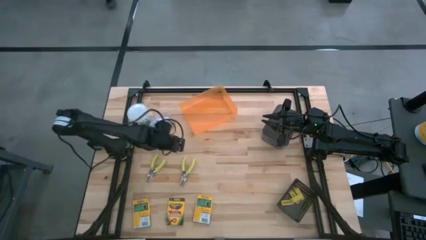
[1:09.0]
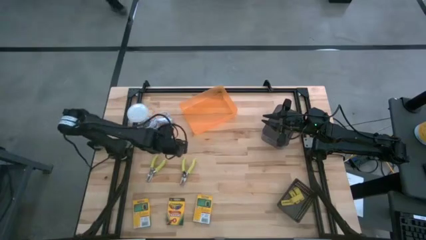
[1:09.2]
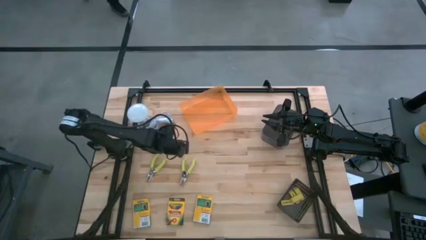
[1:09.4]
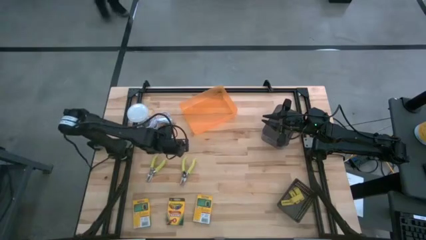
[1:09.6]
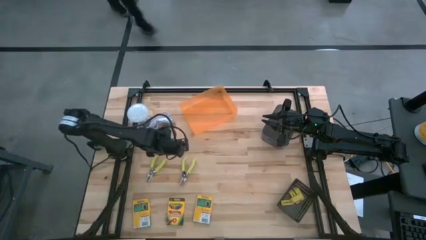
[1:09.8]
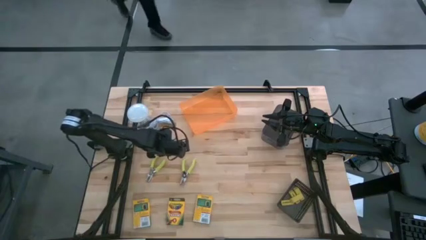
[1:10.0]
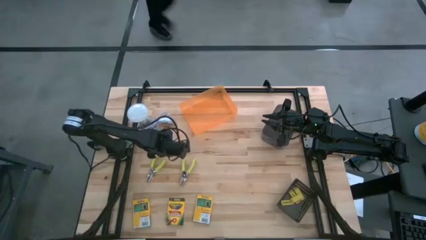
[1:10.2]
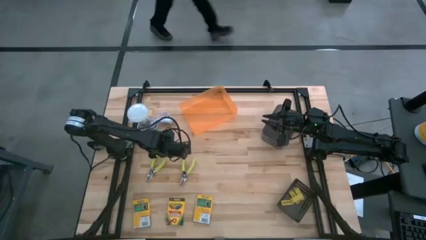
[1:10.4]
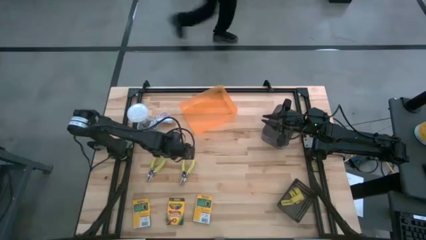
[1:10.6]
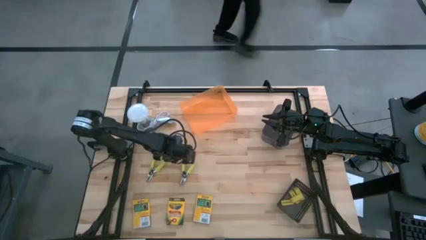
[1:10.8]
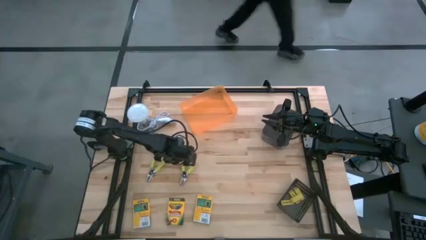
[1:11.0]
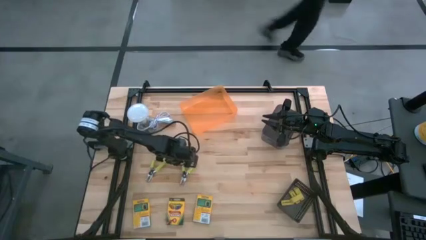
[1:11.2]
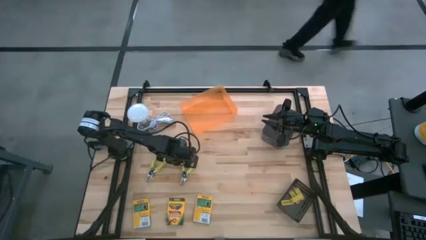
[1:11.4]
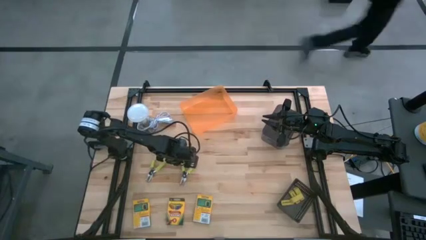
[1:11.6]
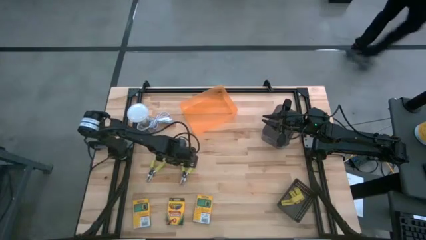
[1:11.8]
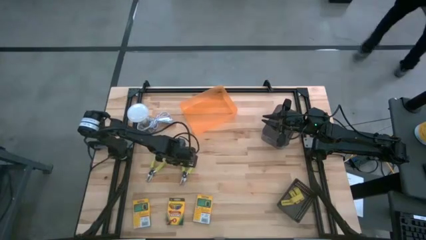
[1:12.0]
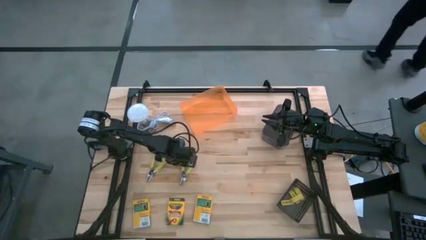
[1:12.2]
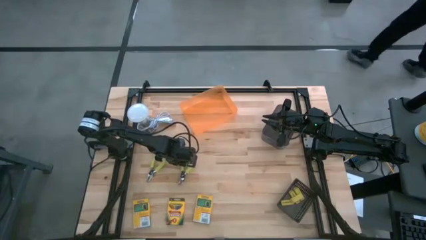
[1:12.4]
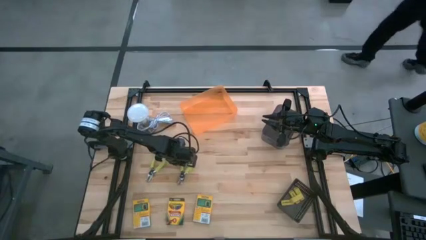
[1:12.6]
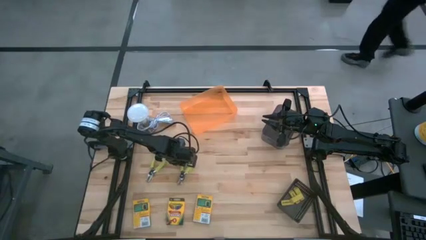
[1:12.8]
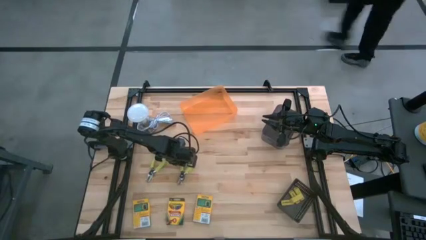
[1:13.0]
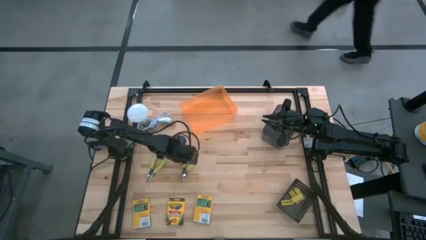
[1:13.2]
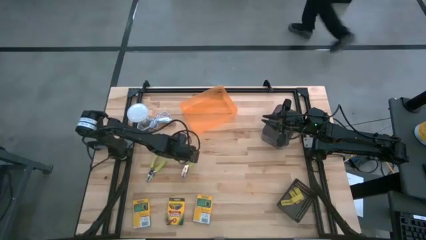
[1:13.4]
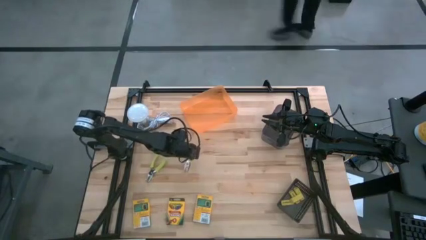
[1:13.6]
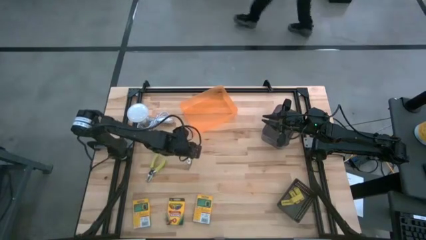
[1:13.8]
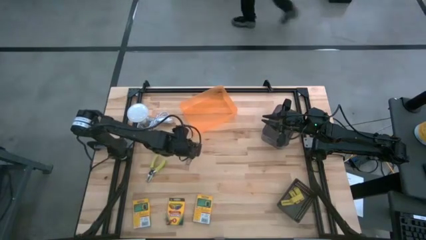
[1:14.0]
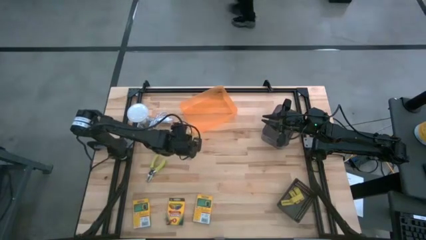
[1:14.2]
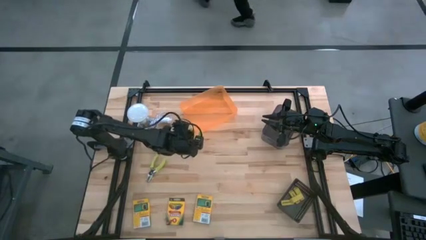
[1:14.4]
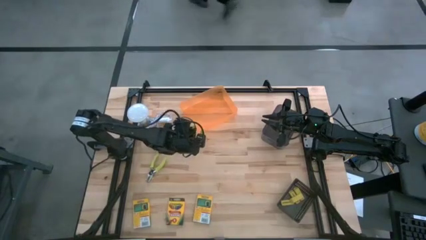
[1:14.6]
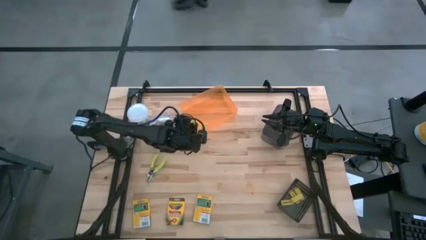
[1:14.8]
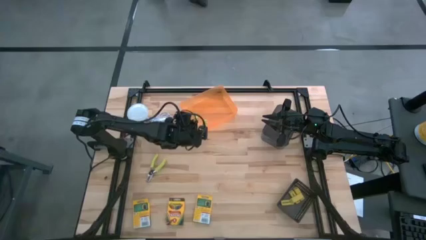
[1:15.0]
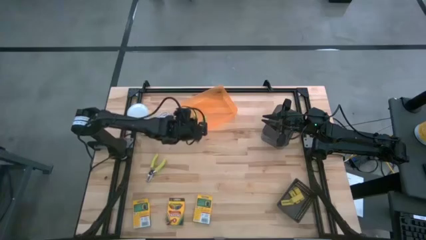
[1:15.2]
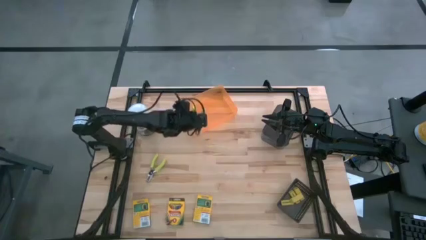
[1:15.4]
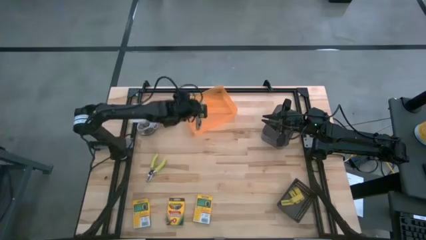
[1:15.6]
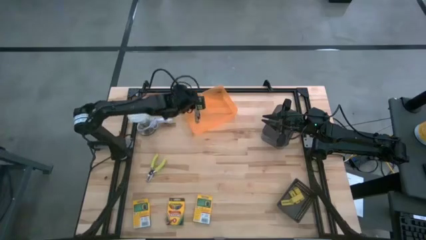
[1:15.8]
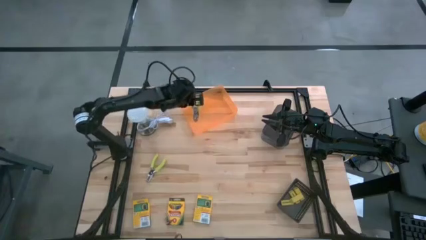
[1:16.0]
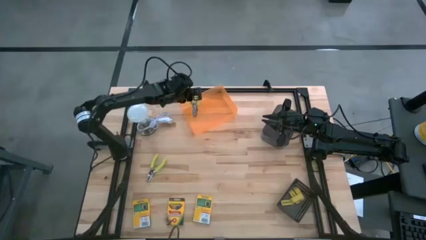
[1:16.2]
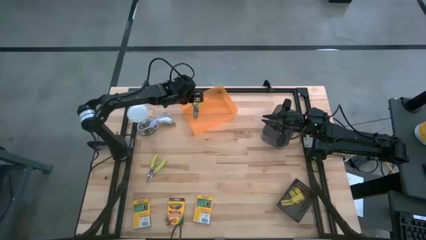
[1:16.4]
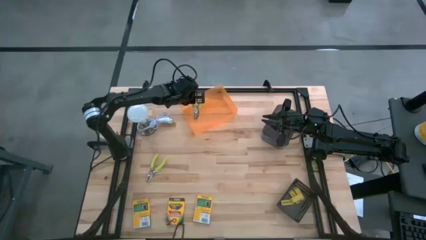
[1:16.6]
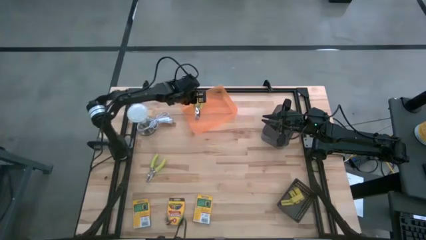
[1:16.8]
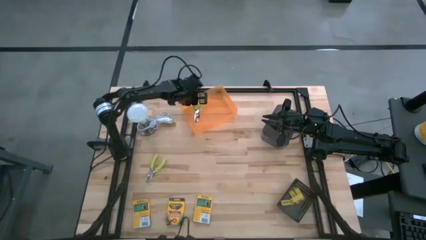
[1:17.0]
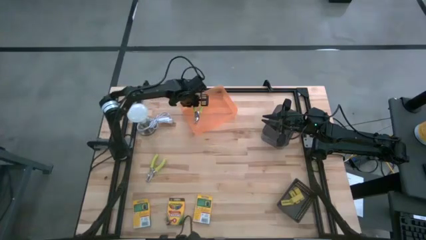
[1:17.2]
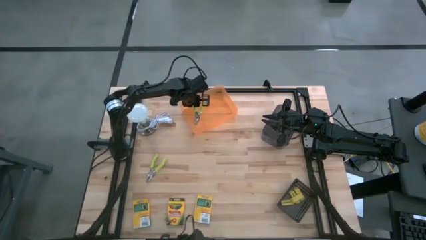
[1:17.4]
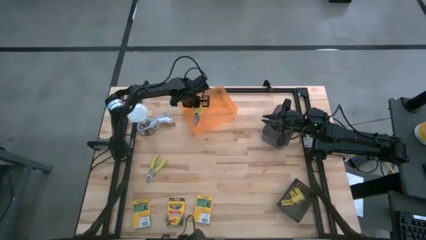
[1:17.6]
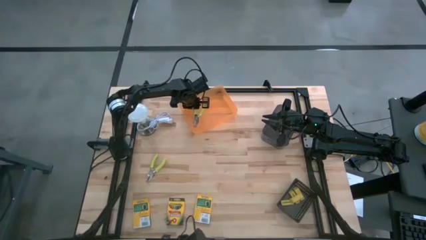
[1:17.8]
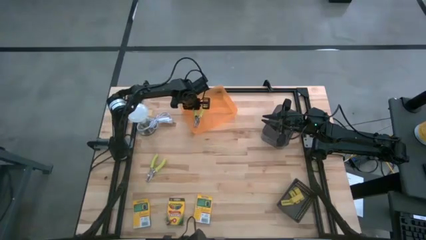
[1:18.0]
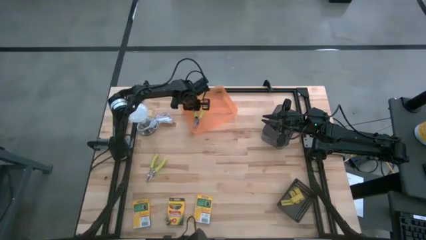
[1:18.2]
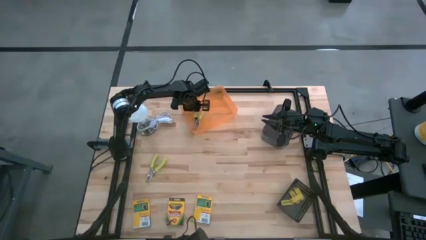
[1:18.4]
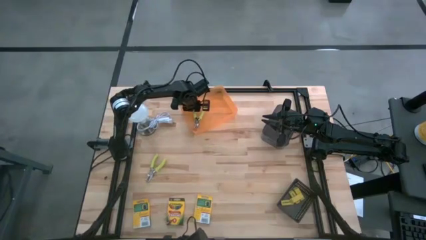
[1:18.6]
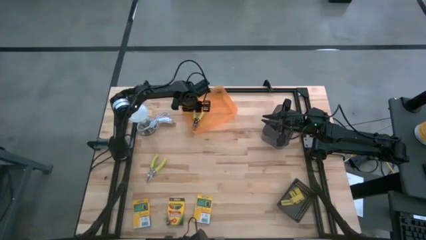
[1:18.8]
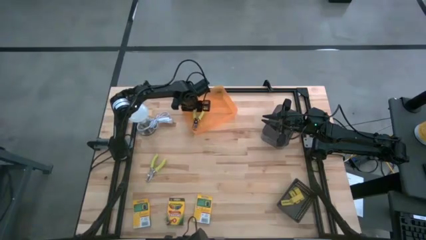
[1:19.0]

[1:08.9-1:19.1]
Task: Pick & Place School Supplies
Put the yellow hole puncher into the orange bin

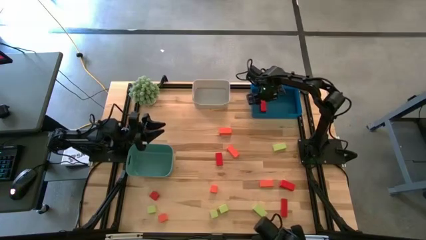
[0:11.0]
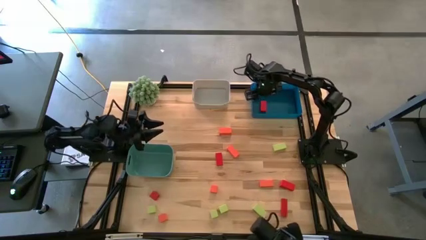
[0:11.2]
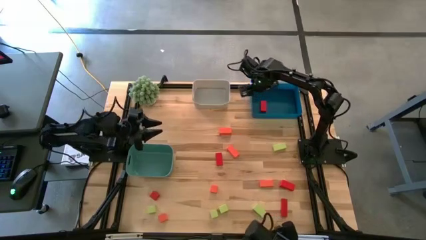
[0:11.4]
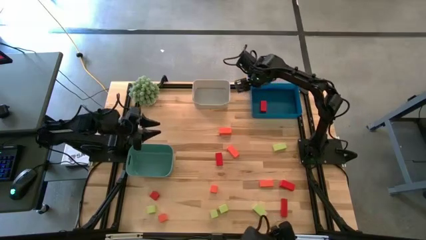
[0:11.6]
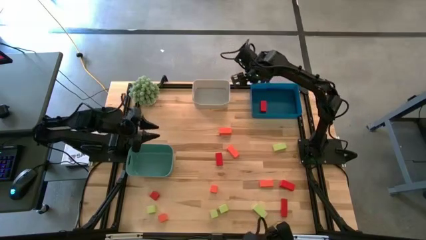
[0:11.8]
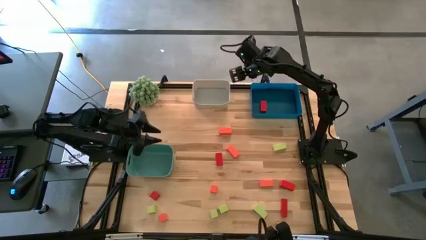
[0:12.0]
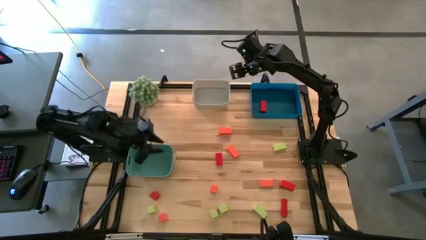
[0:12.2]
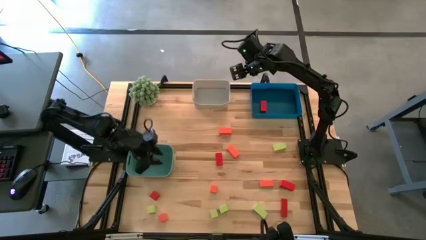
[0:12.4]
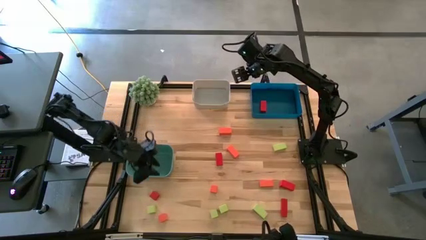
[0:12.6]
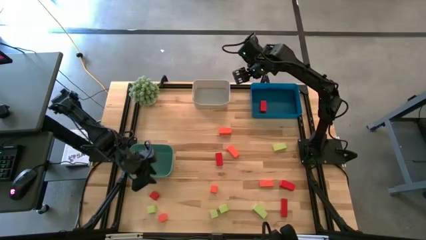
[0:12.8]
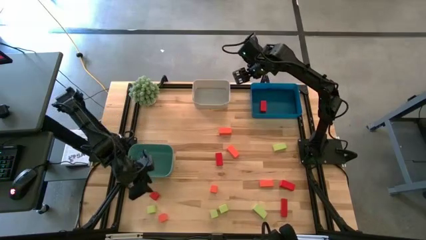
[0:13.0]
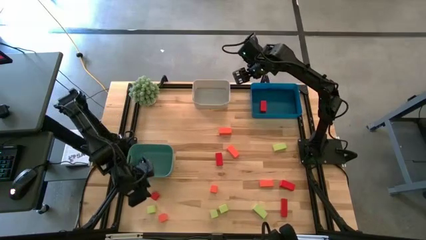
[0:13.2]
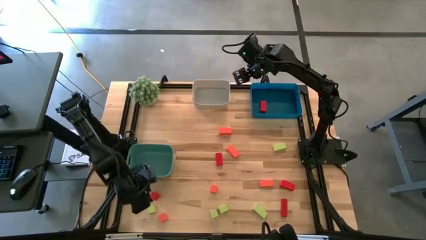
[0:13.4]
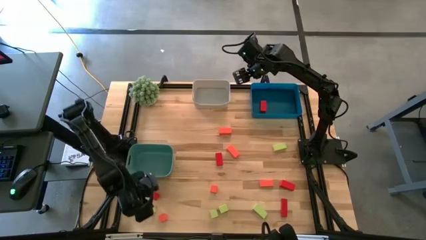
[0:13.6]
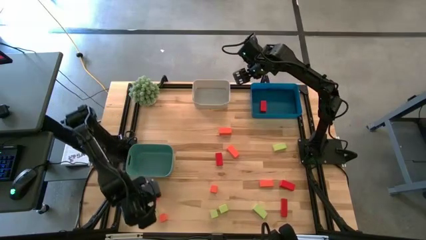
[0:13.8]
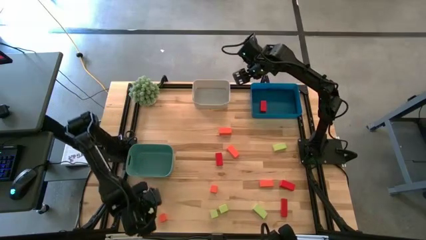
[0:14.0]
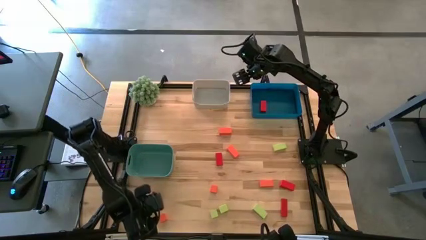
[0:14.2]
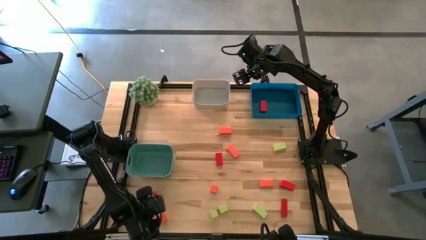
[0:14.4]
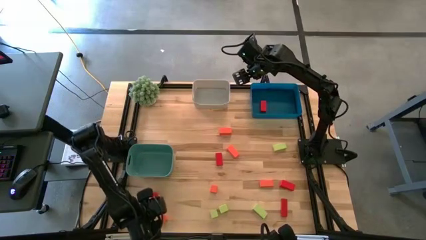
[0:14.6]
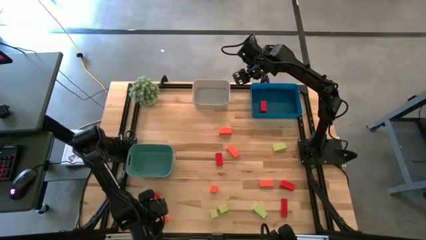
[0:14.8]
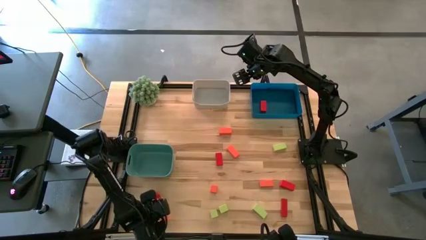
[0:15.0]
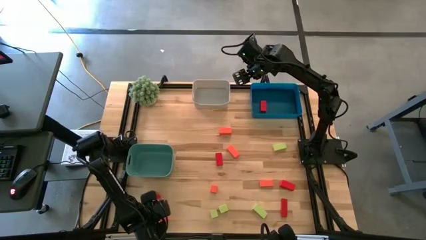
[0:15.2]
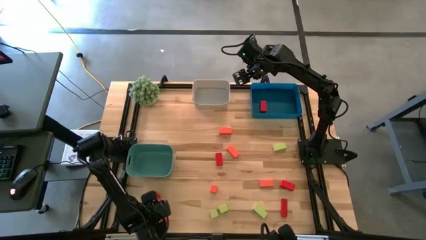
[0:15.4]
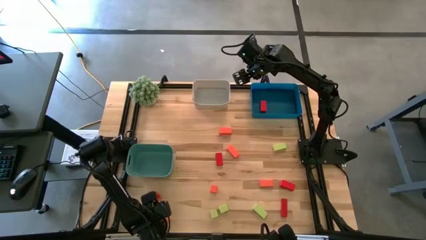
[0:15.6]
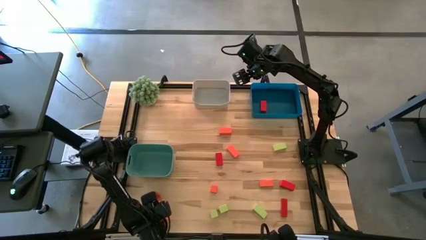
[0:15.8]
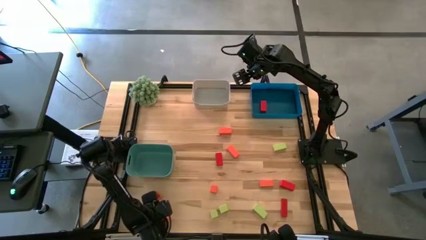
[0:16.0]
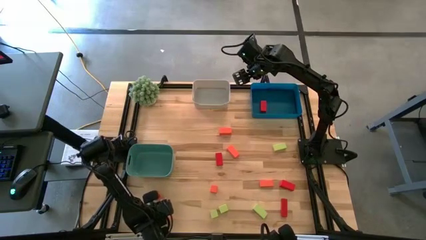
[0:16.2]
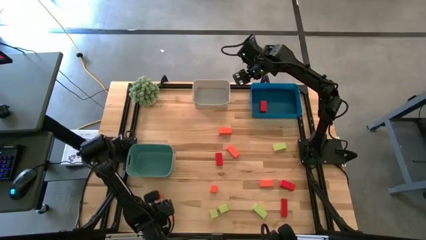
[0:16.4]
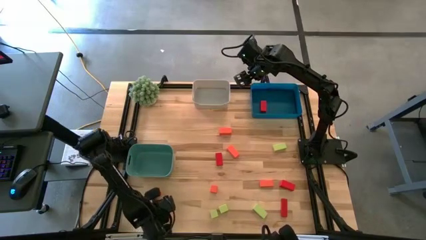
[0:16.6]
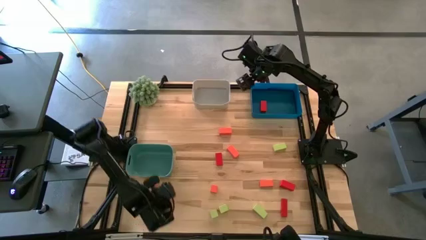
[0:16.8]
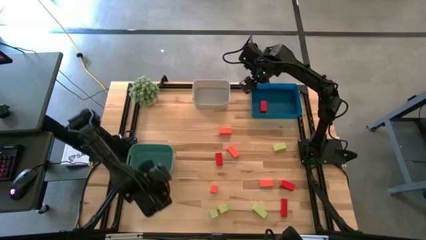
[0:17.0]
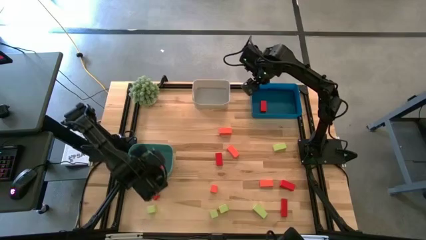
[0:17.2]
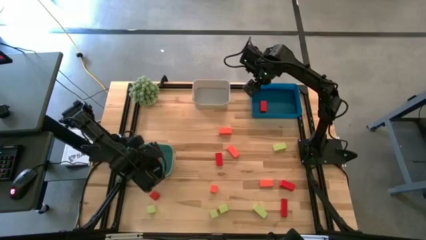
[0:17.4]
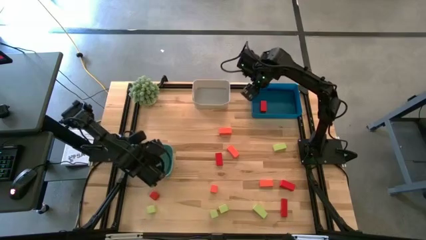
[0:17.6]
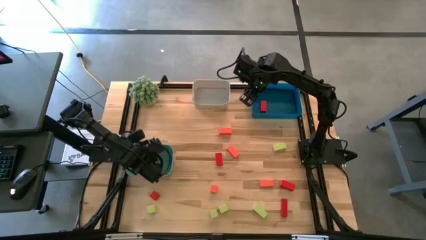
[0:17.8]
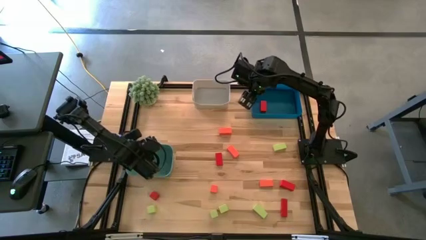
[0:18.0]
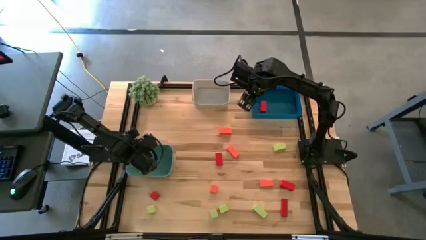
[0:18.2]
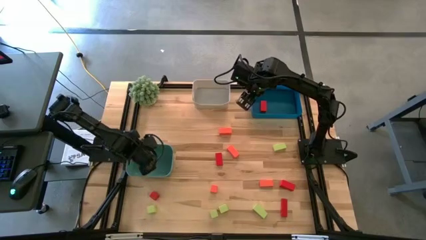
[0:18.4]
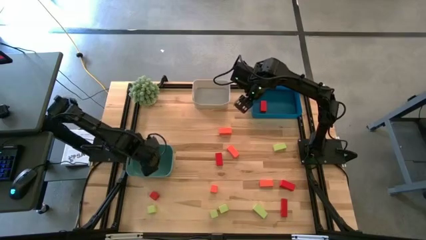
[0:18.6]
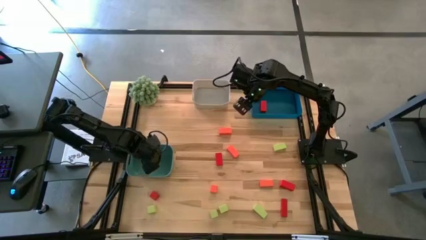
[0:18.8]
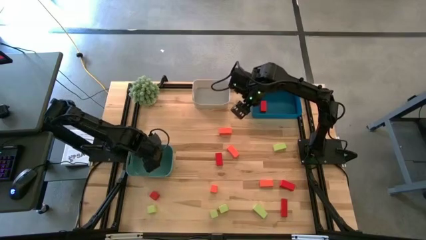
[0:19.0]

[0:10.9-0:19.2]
Task: Sort & place blocks by color
Put the orange block into the green bin
